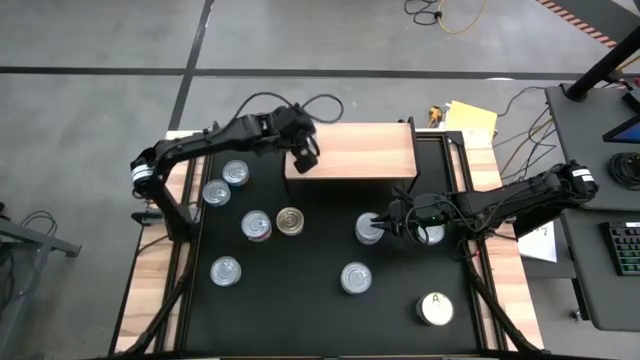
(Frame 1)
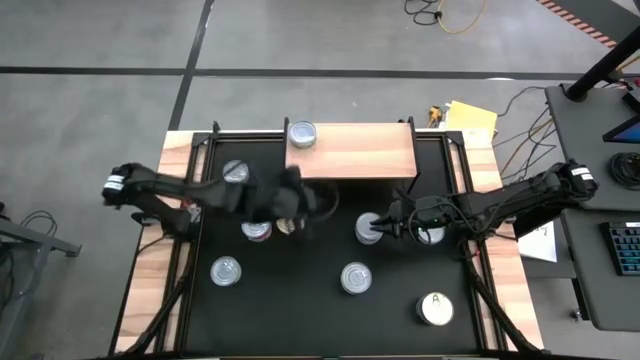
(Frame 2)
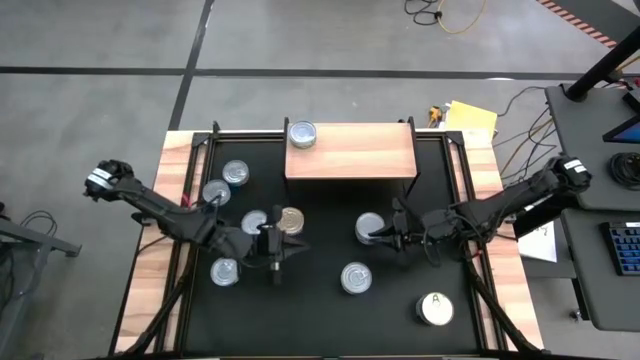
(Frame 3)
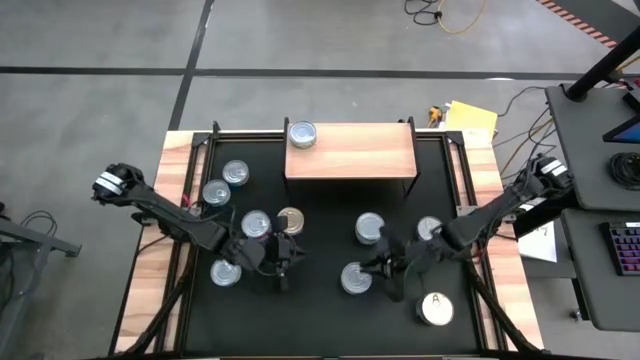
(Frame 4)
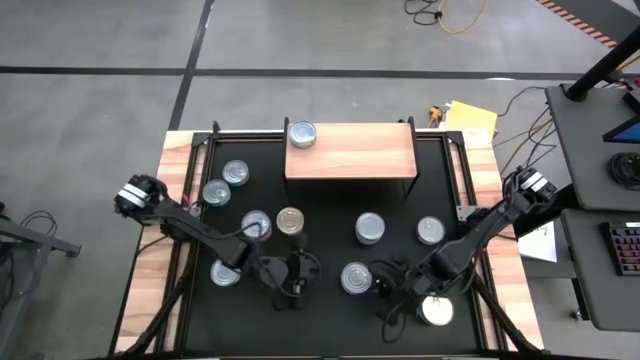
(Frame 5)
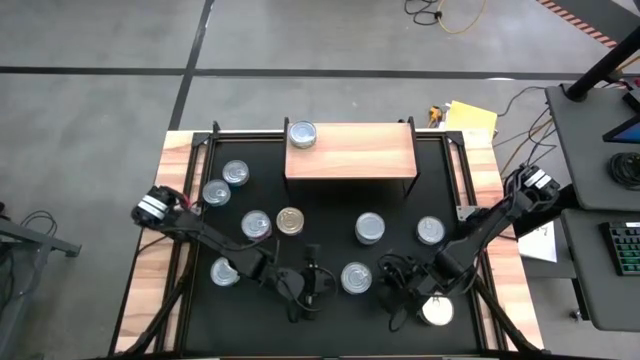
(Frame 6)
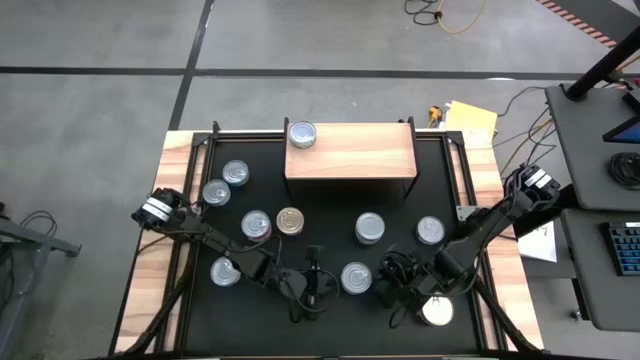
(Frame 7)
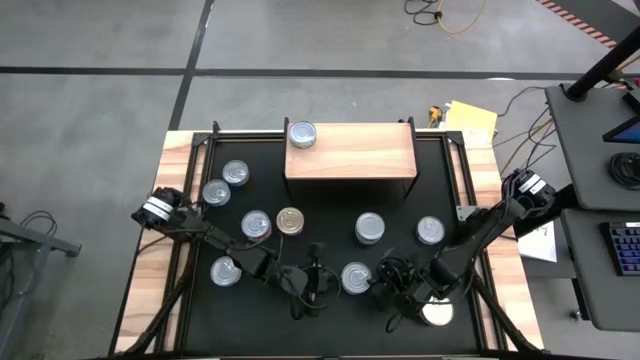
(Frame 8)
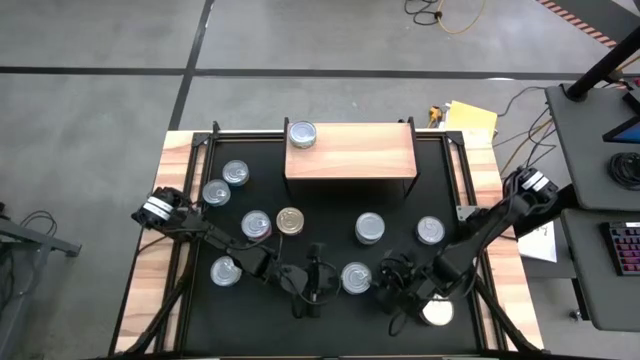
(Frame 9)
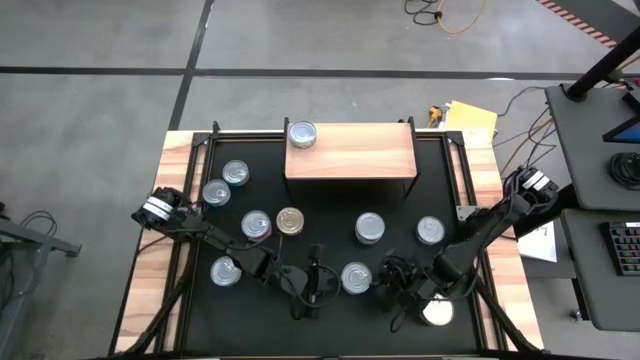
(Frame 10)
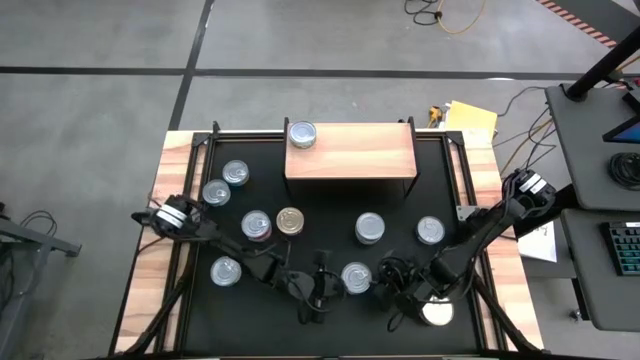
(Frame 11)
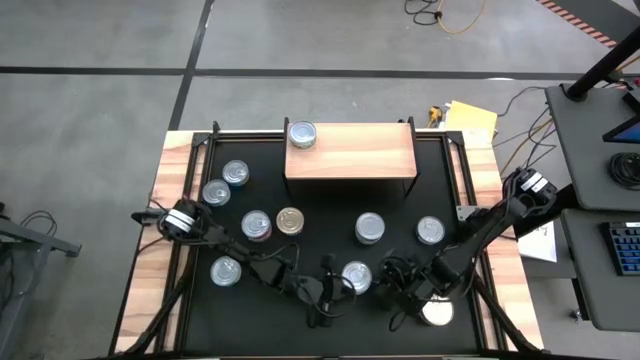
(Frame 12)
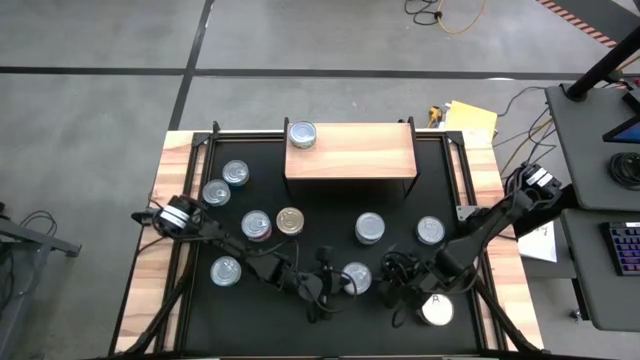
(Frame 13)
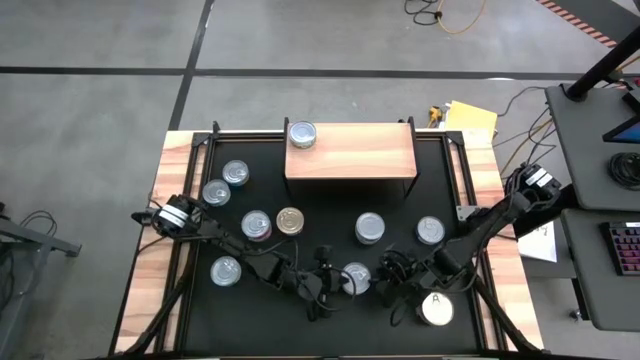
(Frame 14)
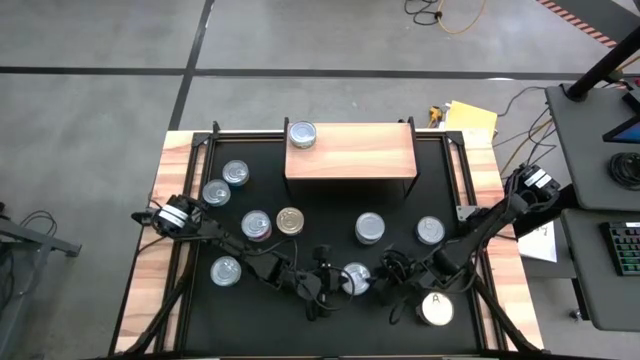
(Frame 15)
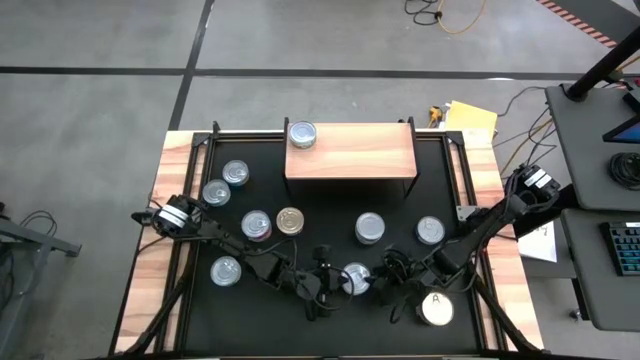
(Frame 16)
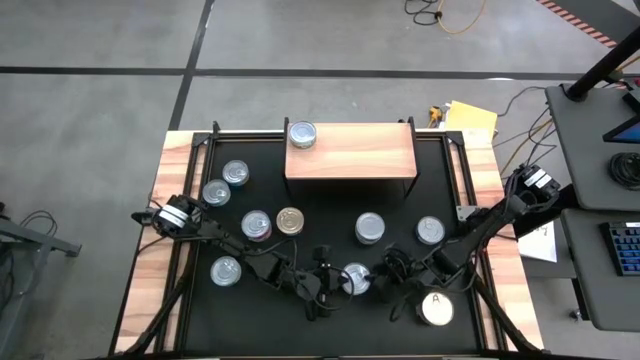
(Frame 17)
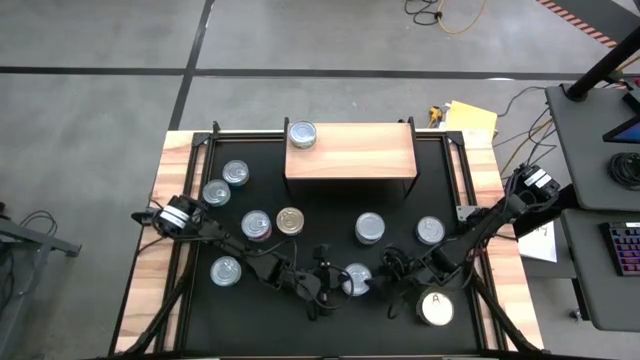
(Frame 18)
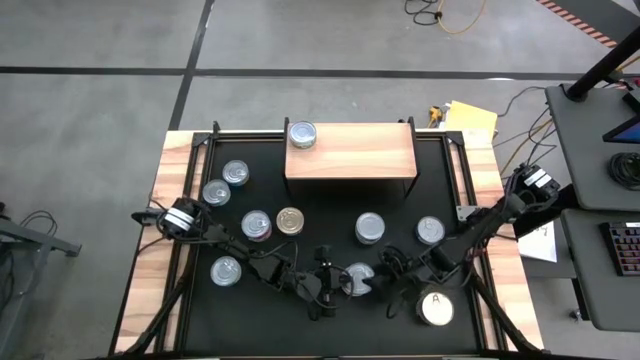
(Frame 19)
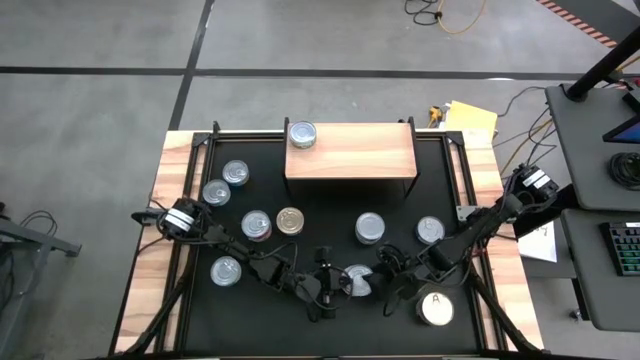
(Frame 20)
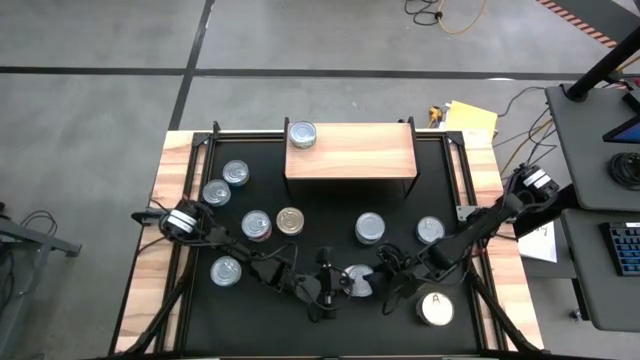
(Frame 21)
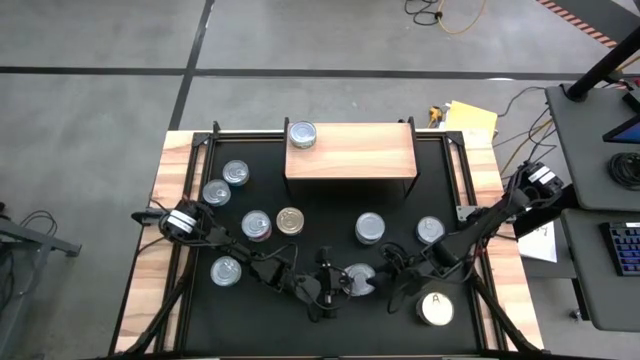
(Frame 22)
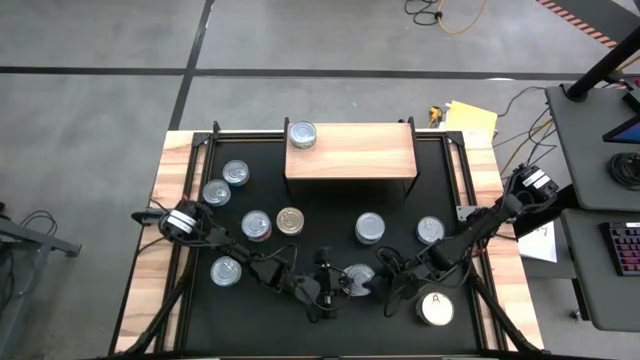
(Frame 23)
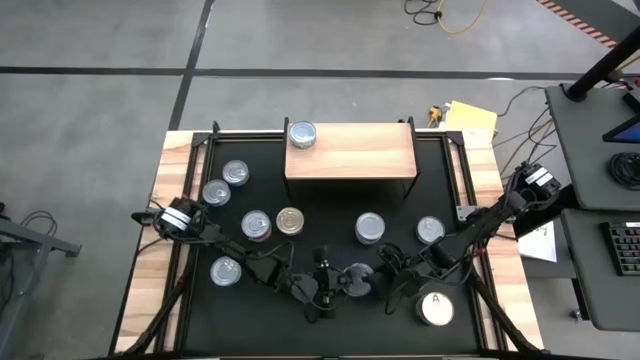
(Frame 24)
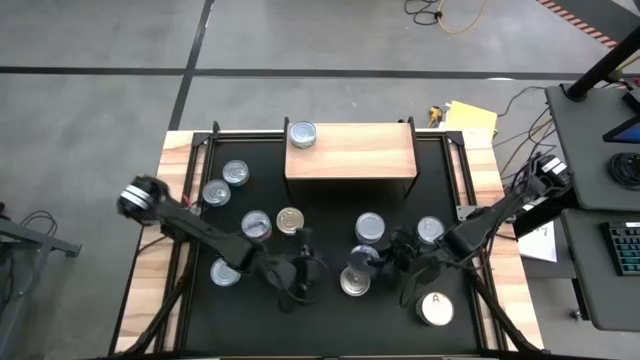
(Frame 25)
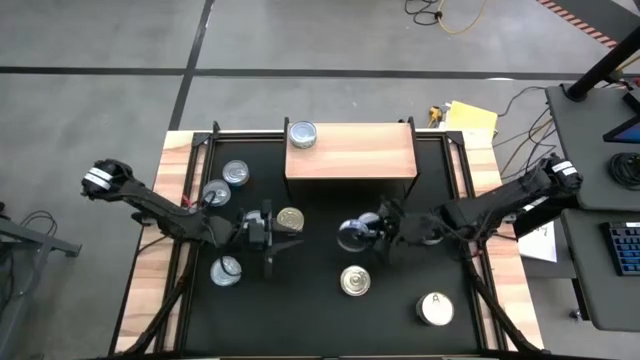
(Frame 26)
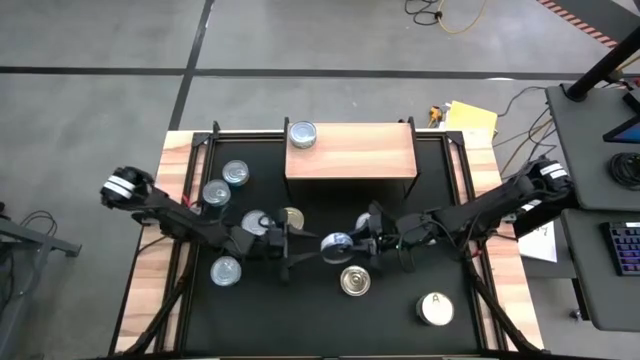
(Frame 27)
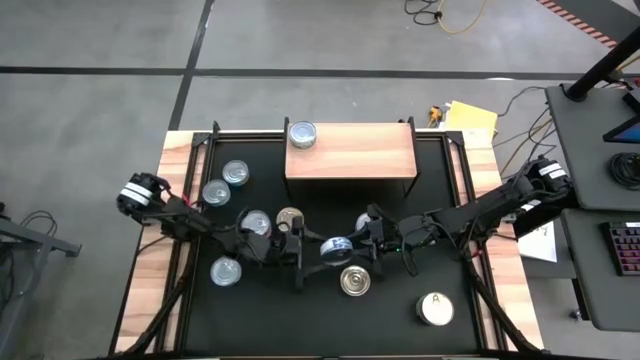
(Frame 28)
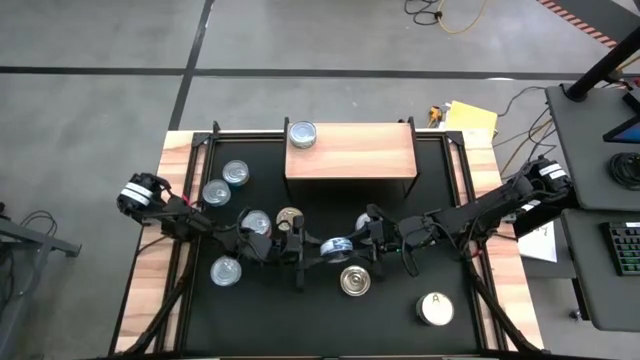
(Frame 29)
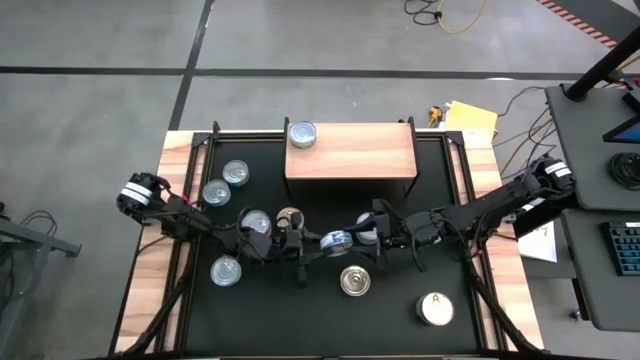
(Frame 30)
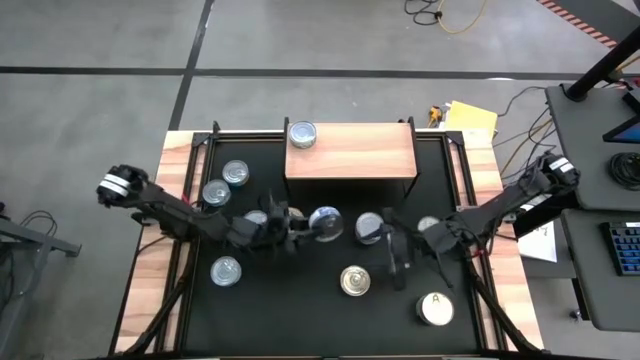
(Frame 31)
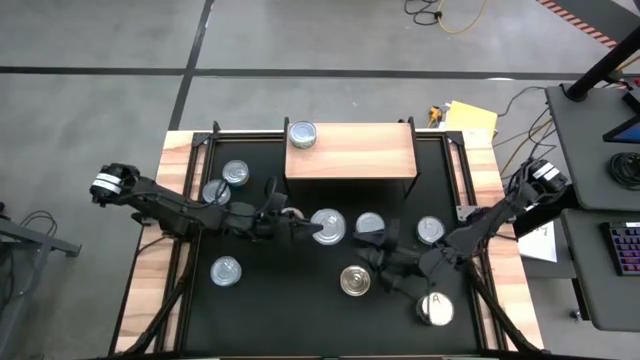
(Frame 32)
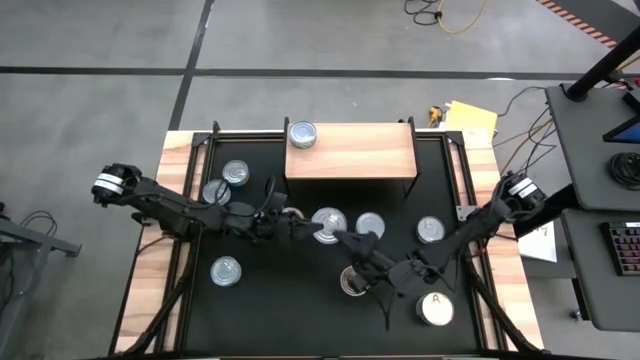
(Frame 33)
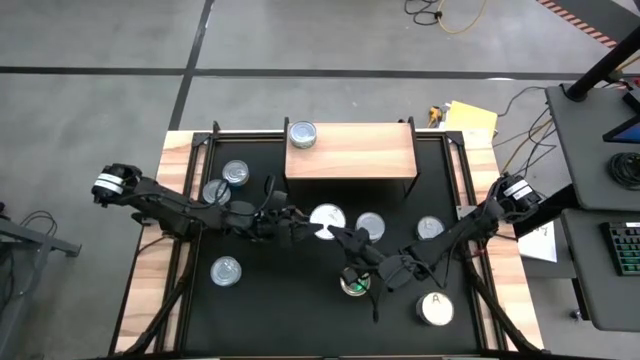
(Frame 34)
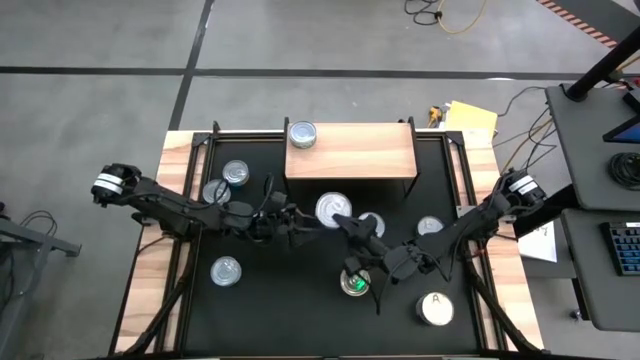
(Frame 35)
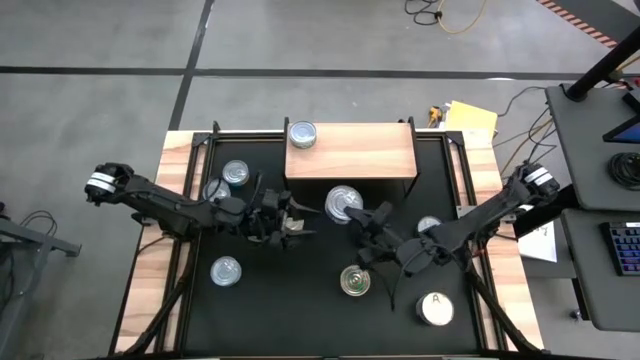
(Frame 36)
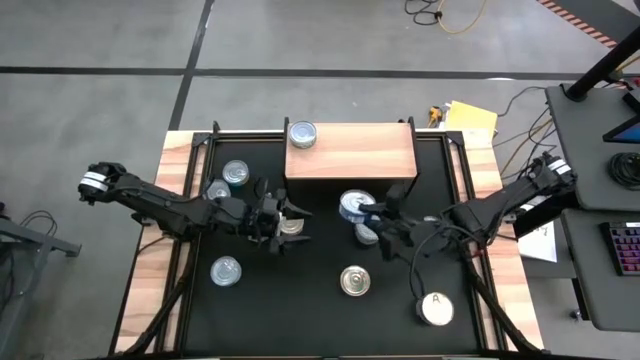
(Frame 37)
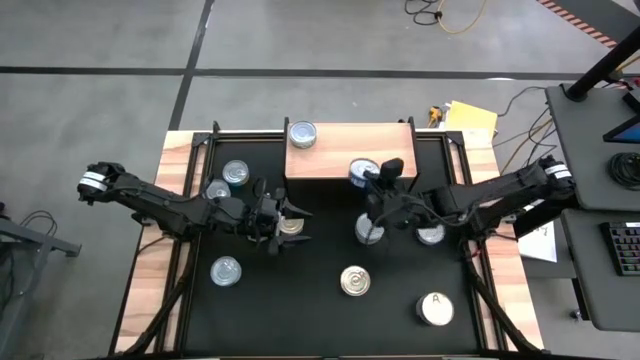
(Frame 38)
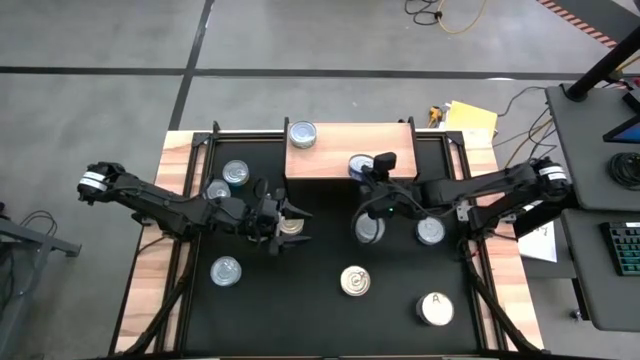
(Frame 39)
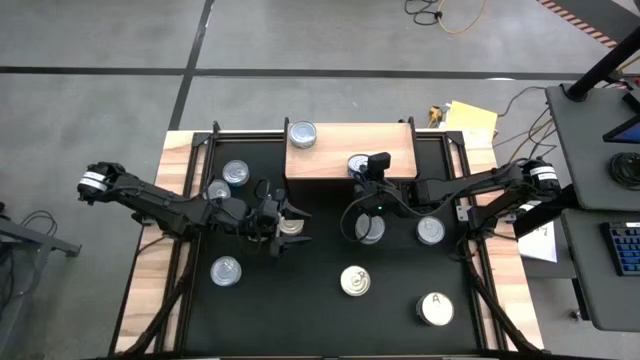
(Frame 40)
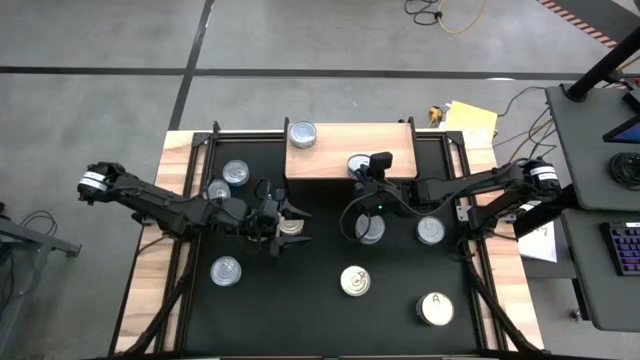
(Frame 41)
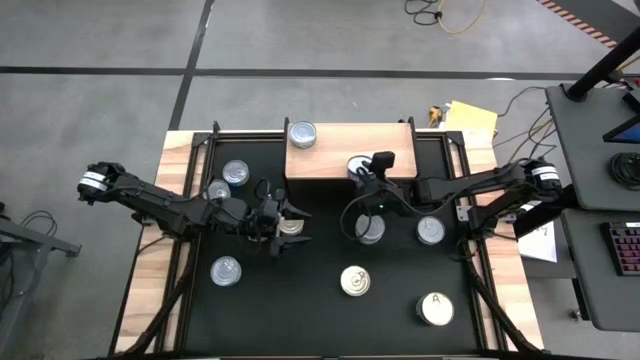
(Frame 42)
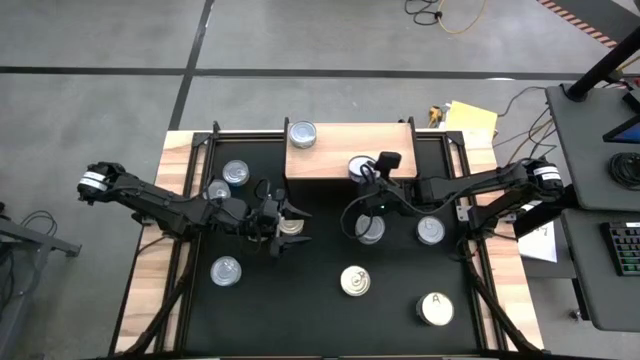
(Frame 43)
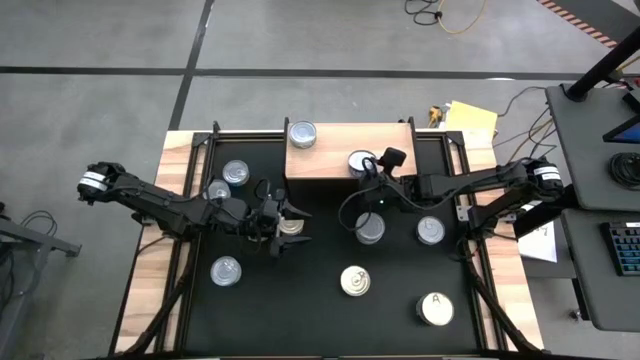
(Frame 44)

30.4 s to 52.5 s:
Task: Stack canned seafood by type on shelf
Put the blue tuna can on the shelf
